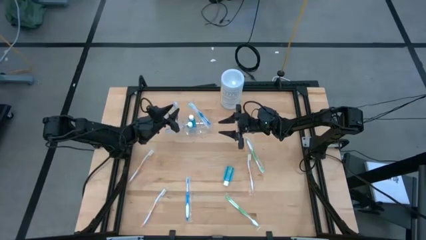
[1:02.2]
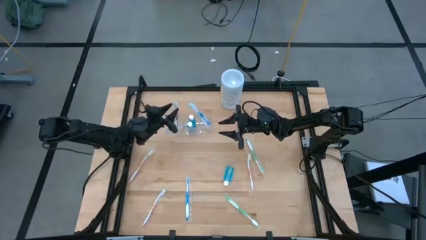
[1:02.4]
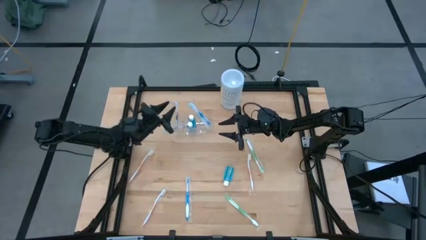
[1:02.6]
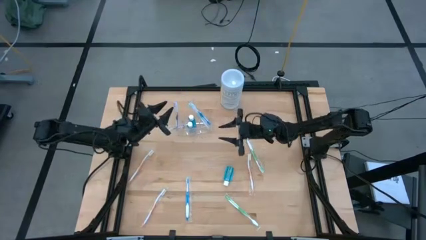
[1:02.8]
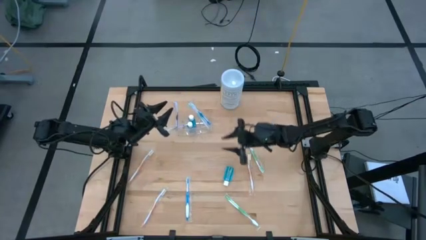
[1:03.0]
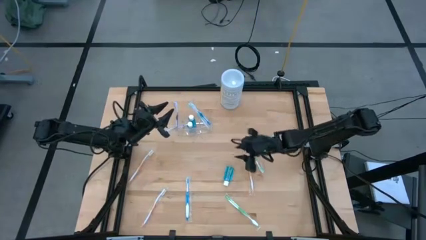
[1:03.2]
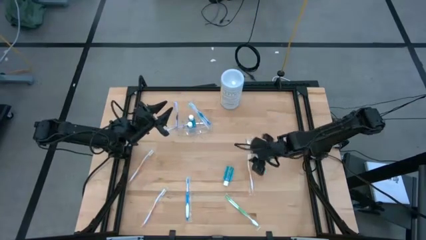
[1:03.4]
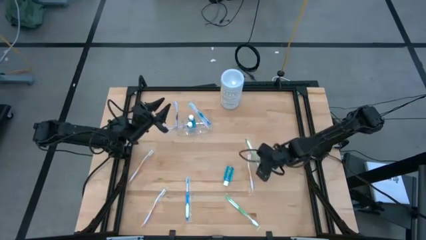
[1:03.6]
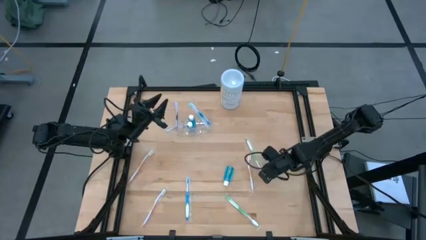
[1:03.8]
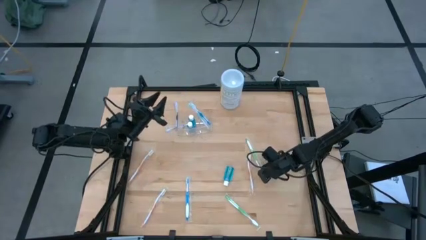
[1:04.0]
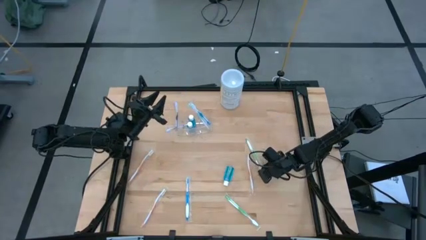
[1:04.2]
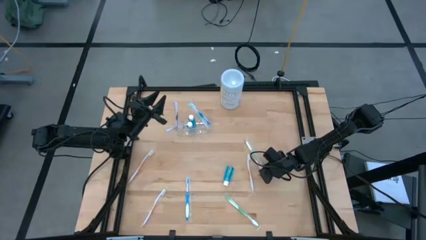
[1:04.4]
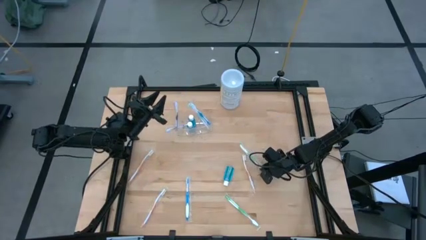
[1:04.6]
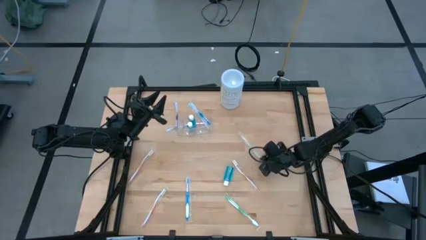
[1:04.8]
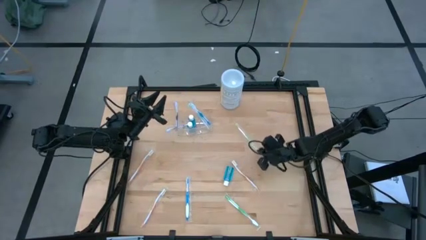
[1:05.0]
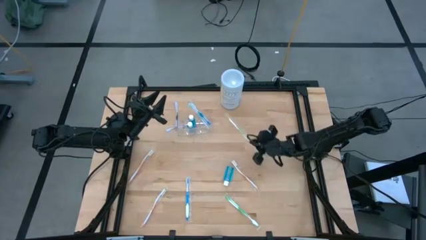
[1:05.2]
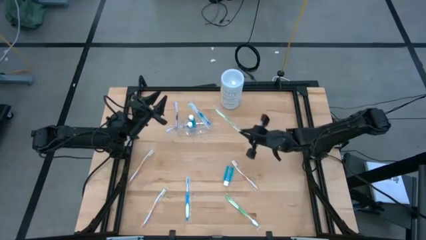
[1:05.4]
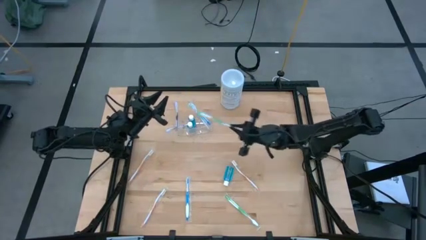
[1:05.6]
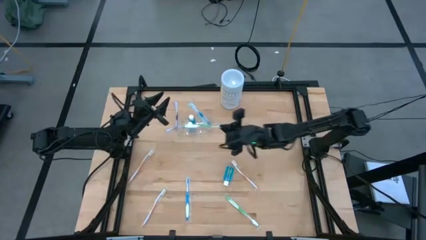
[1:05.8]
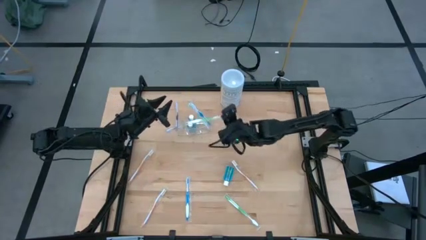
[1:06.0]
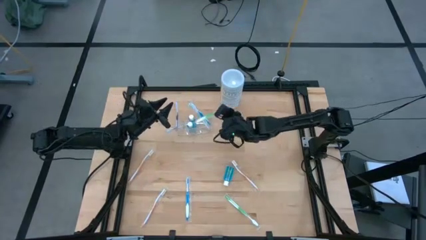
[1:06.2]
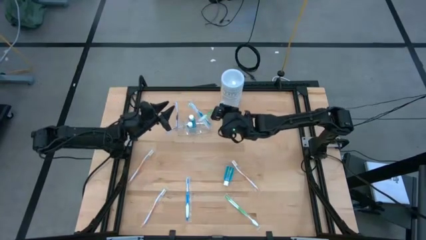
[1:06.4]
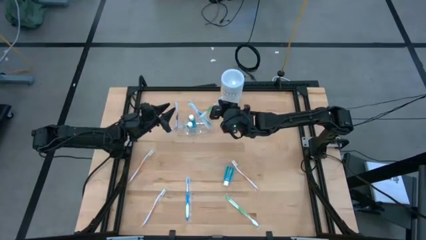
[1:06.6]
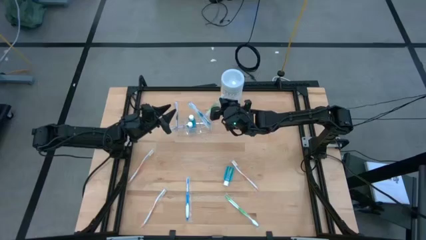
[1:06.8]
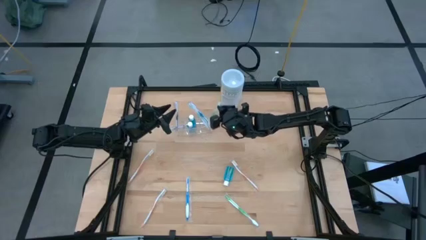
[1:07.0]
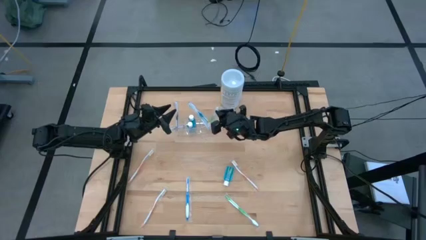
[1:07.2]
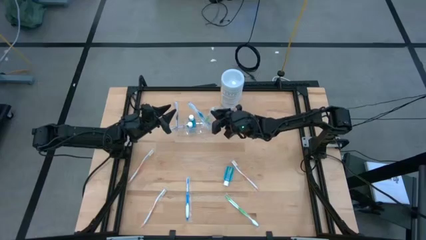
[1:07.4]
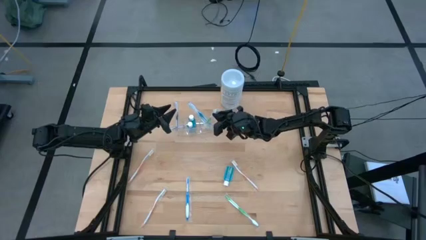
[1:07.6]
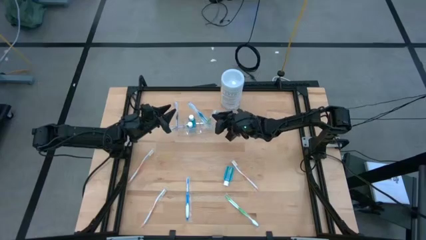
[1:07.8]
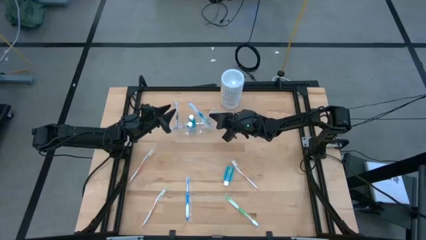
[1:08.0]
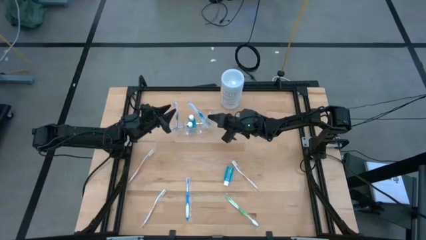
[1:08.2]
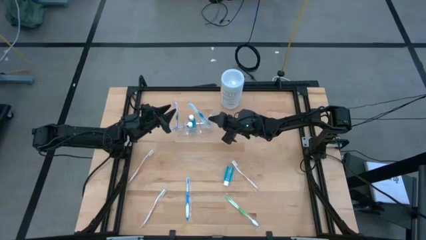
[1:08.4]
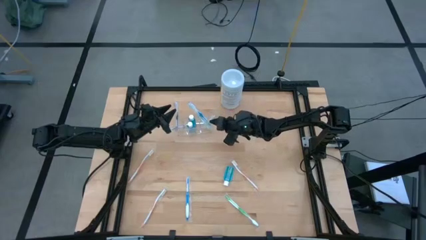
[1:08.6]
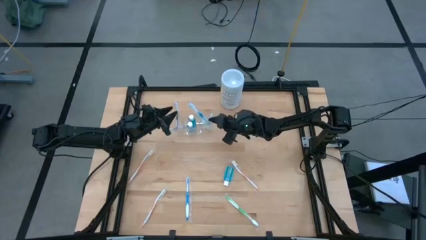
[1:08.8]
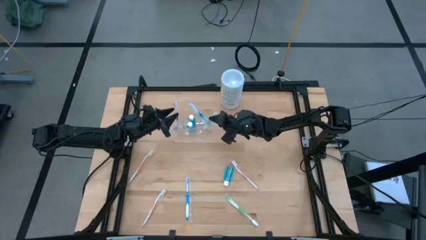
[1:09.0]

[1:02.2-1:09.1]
Task: Pick & Place toothbrushing station
Put the top green toothbrush into the transparent organizer

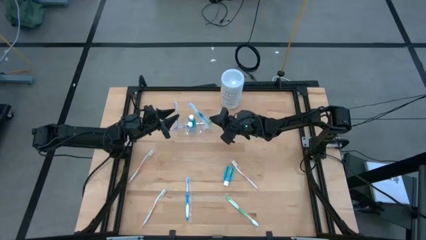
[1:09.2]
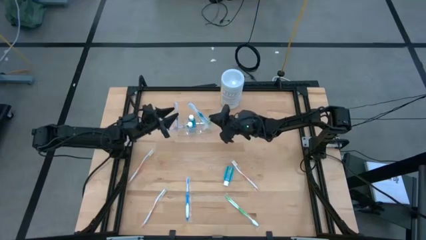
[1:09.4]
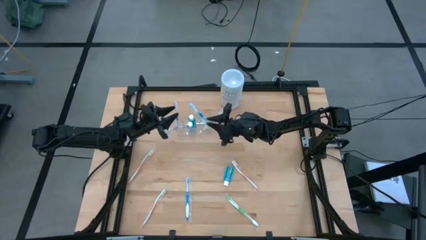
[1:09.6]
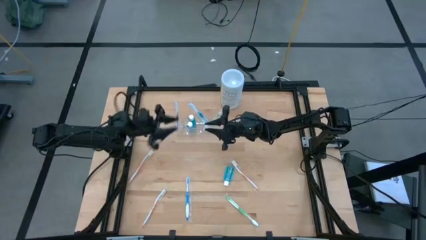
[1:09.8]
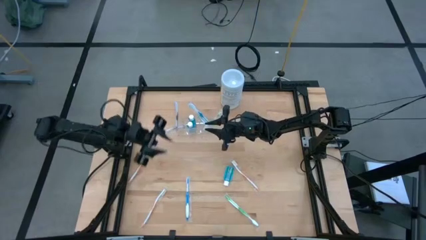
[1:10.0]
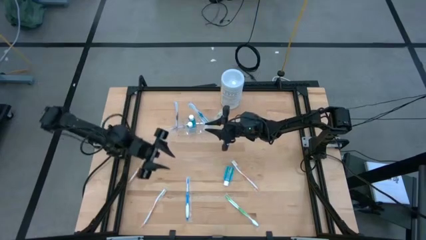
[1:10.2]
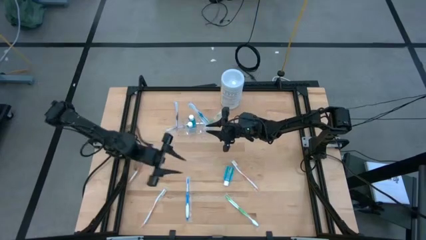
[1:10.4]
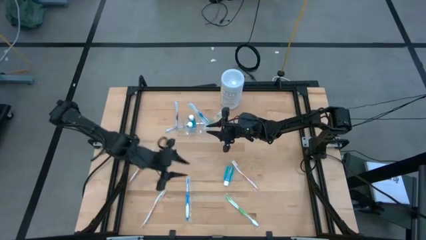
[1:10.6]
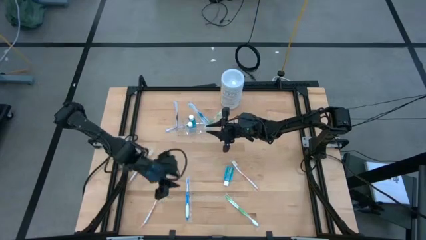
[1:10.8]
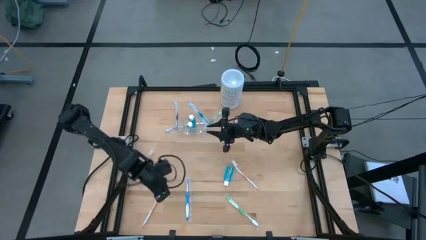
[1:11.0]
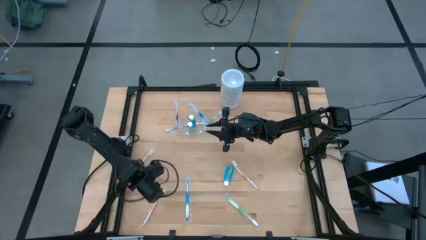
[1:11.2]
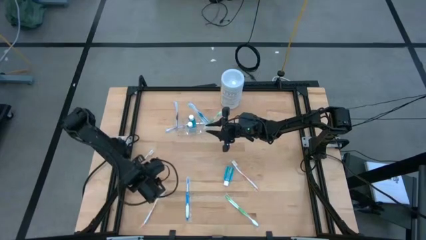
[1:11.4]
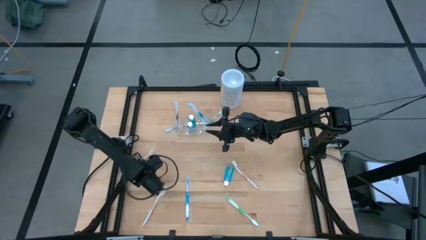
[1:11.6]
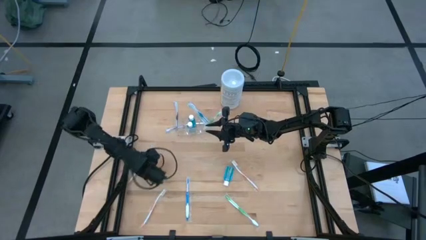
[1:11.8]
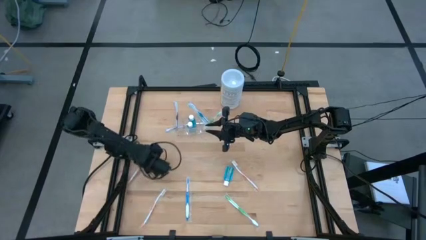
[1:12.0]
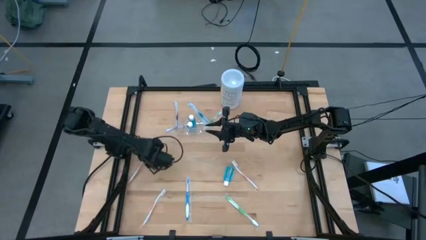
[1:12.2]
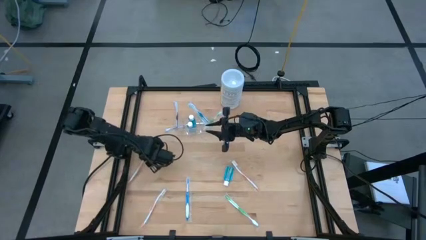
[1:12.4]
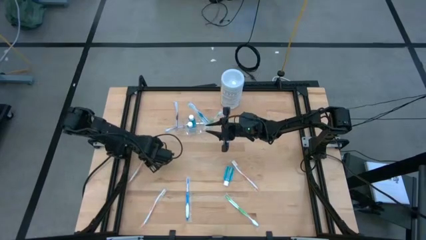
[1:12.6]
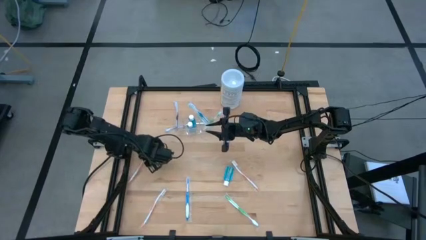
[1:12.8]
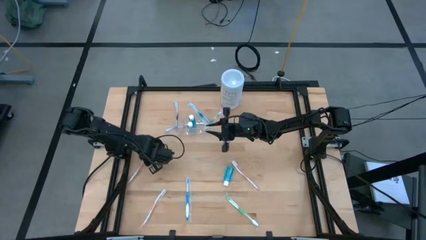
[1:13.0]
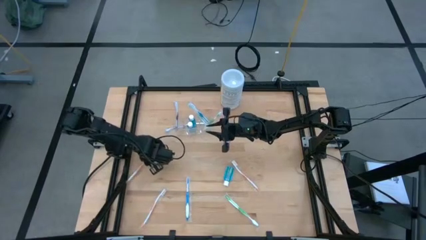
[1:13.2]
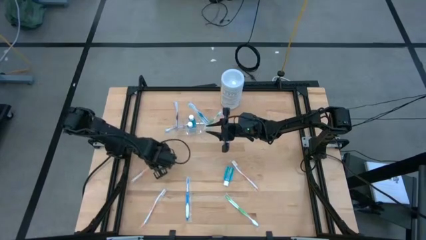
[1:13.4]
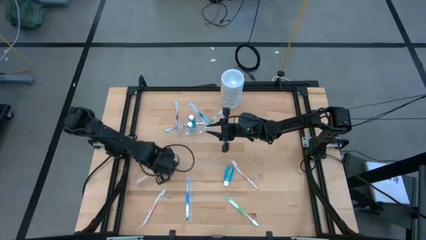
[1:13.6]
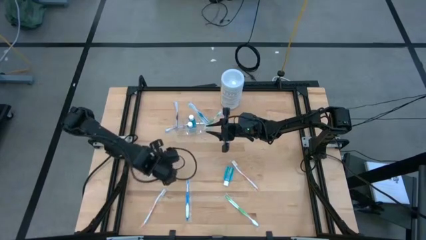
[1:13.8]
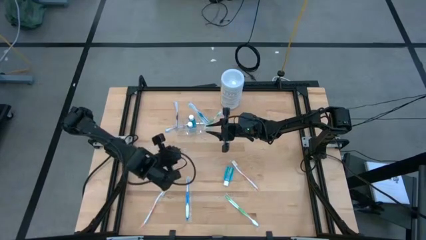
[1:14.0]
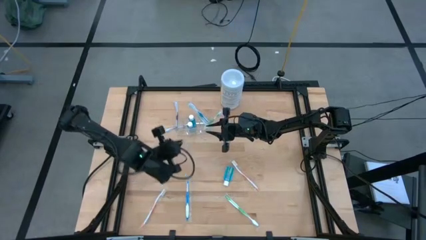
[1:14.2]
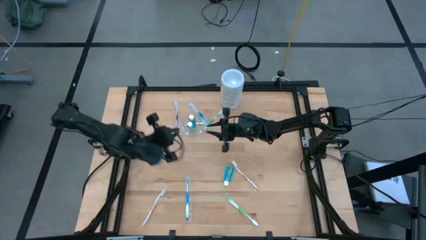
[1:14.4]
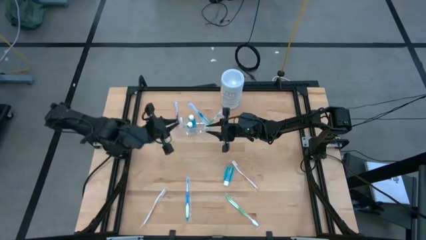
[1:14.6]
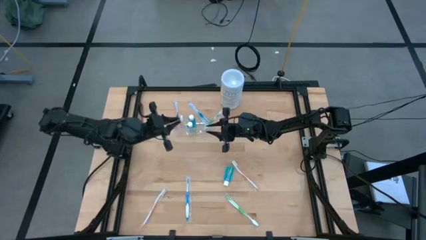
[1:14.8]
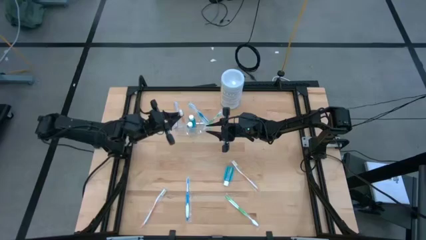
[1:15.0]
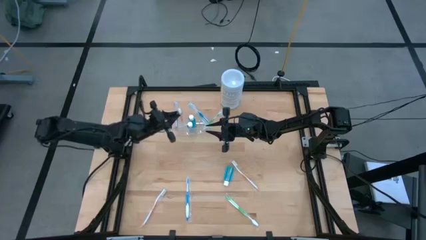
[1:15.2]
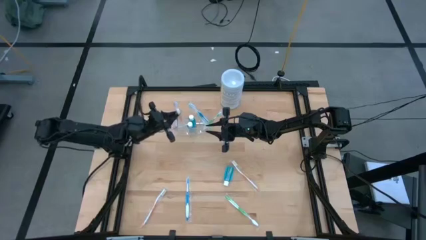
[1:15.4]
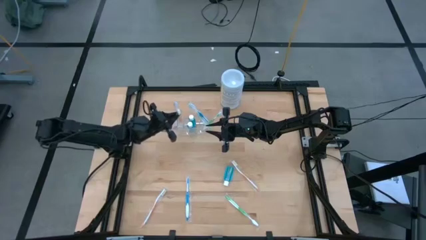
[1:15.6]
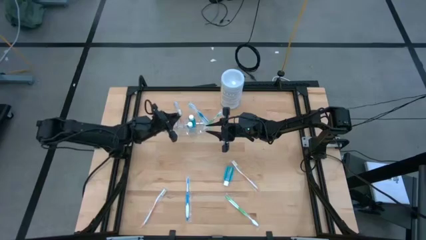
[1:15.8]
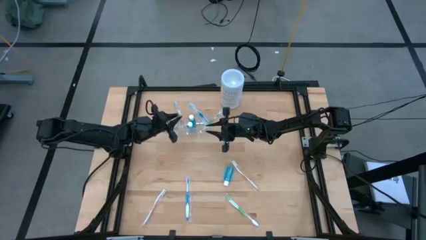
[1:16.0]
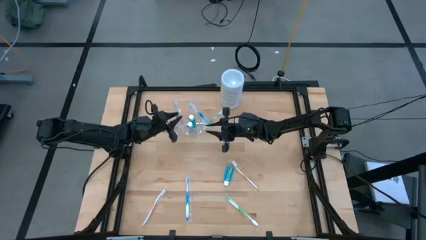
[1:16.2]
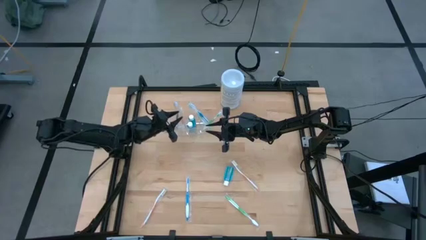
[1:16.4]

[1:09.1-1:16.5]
Put the top left orange toothbrush into the transparent organizer

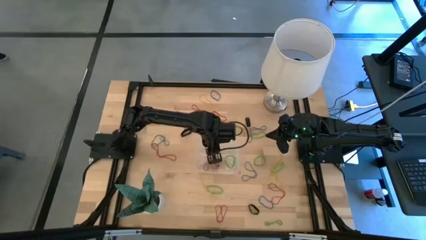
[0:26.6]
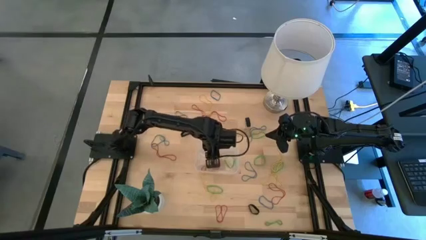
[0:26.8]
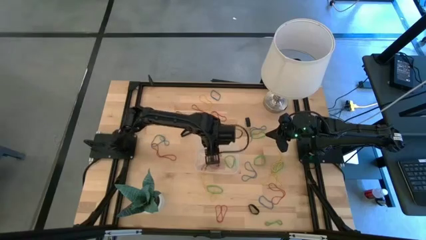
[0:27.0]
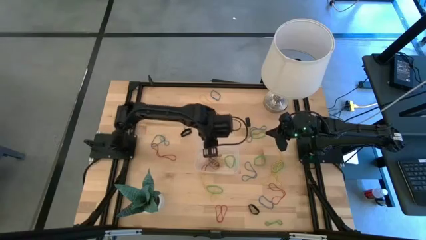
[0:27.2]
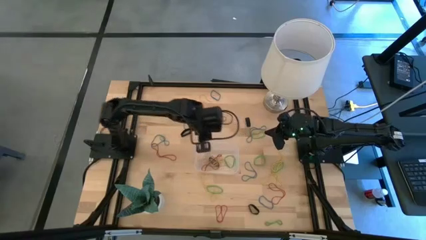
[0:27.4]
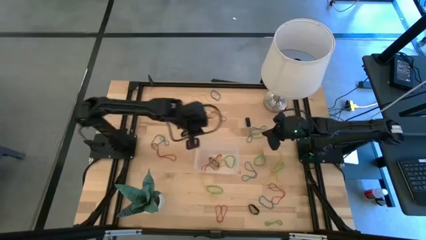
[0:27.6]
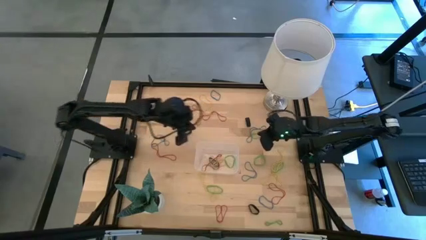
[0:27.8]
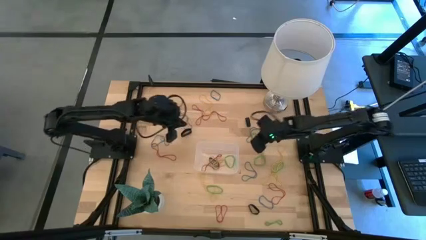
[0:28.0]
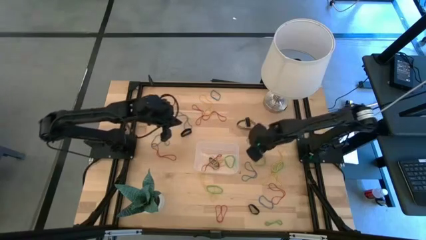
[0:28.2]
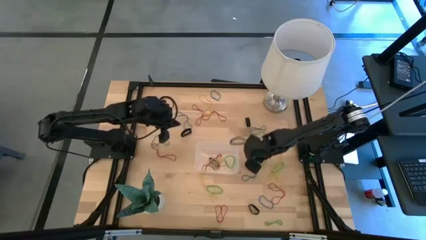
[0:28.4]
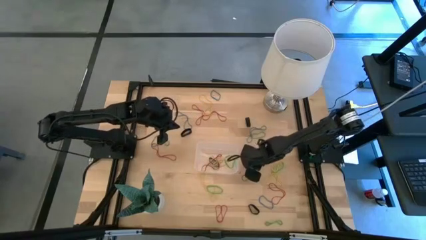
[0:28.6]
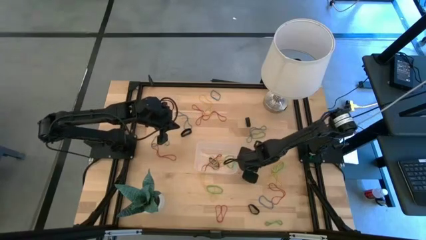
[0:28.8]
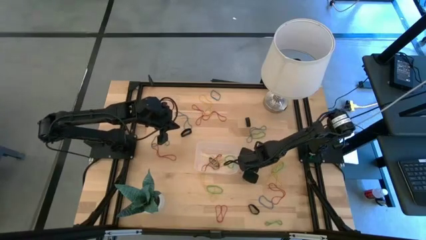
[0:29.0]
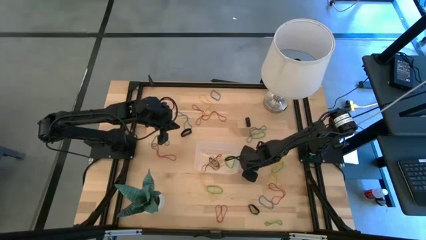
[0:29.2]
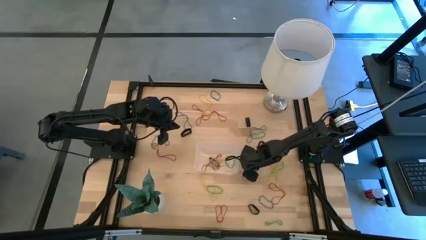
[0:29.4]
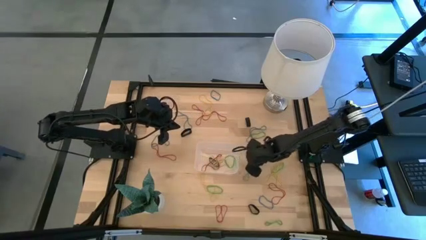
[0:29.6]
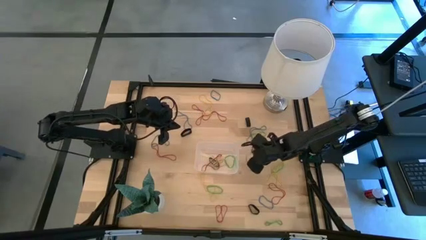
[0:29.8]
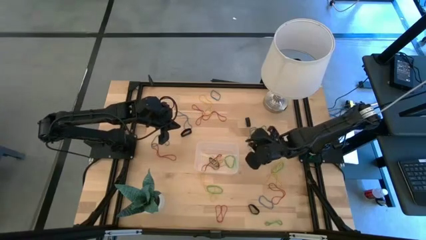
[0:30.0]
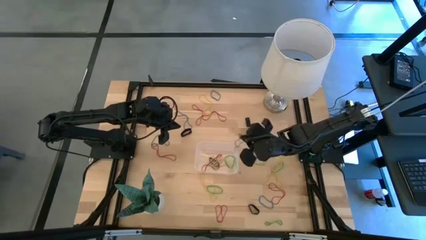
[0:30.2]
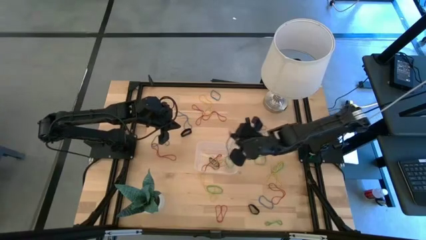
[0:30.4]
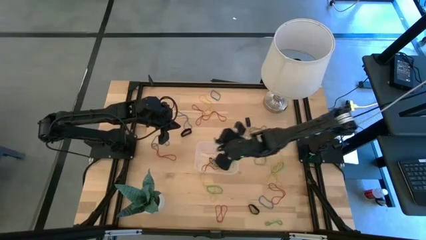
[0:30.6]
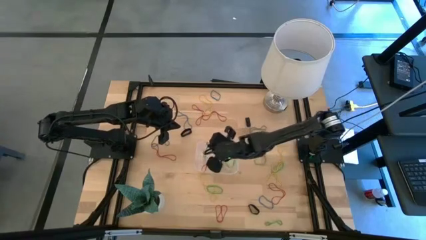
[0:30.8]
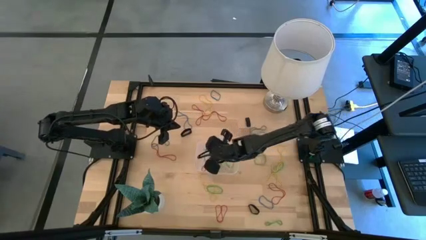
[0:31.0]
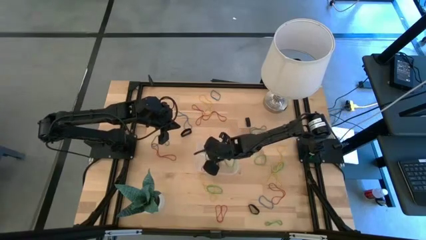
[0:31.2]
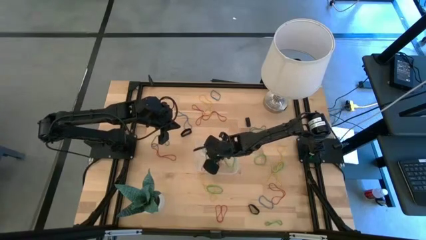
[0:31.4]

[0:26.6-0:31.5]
Task: Pick and place rubber bands into bin
Put the blue rubber band into the transparent bin
